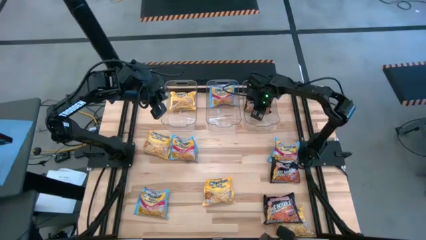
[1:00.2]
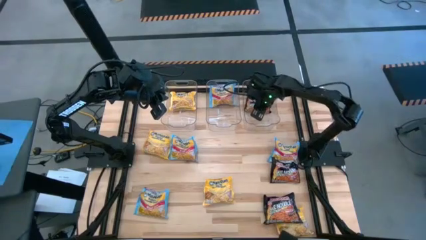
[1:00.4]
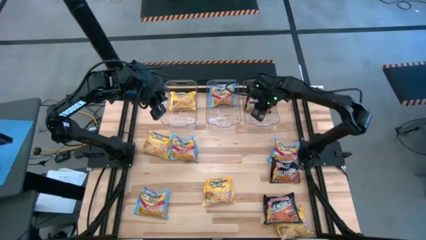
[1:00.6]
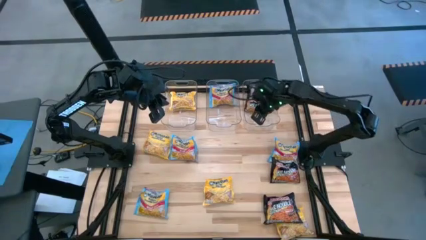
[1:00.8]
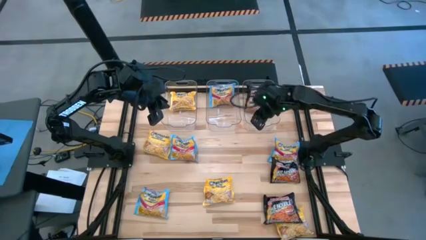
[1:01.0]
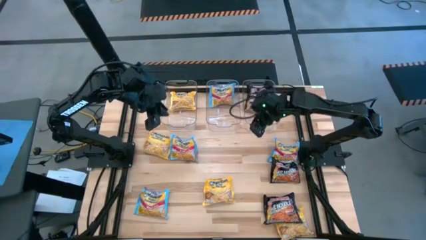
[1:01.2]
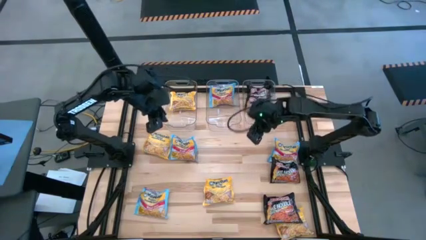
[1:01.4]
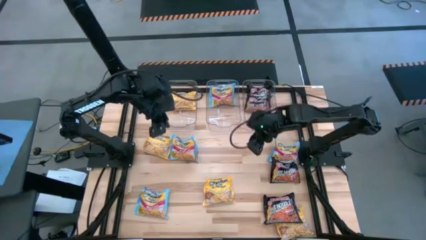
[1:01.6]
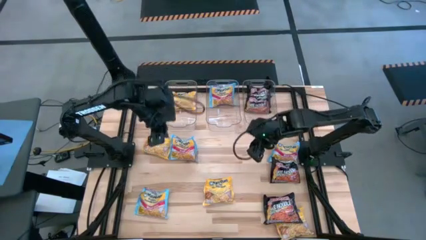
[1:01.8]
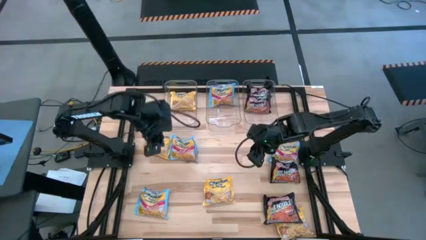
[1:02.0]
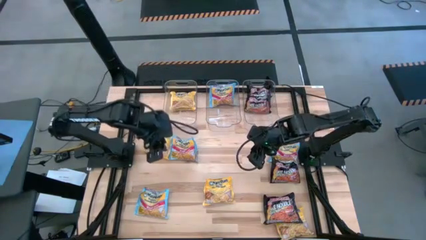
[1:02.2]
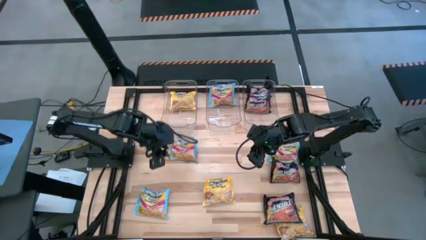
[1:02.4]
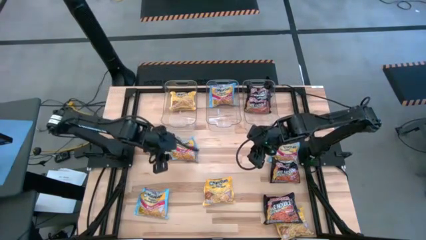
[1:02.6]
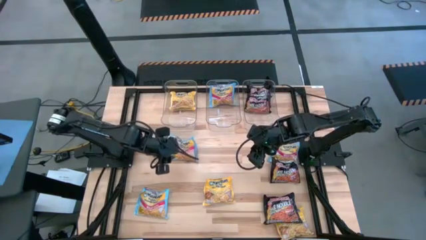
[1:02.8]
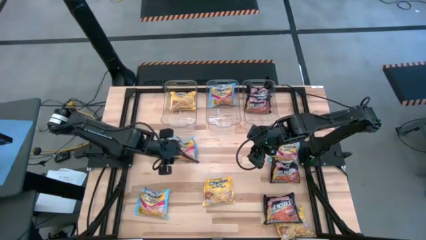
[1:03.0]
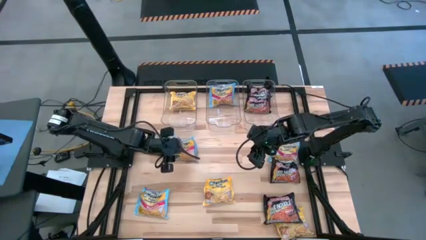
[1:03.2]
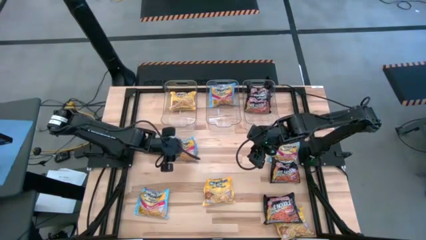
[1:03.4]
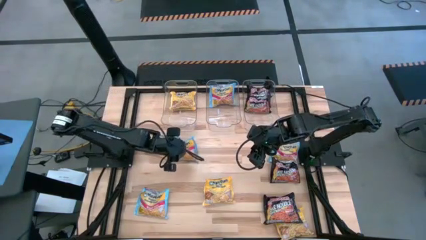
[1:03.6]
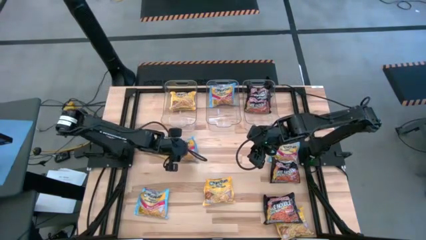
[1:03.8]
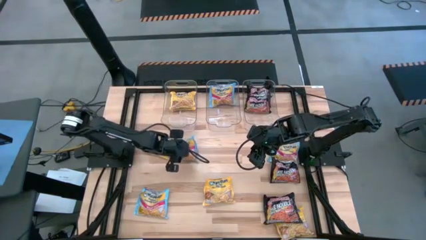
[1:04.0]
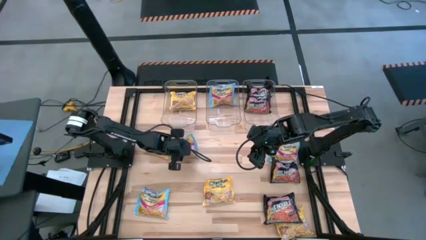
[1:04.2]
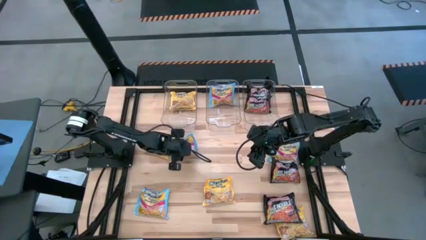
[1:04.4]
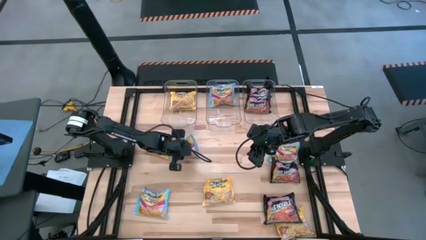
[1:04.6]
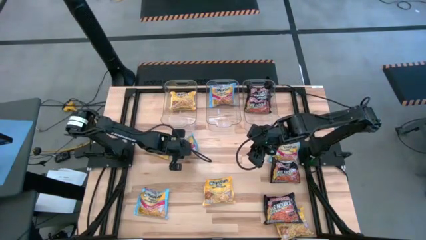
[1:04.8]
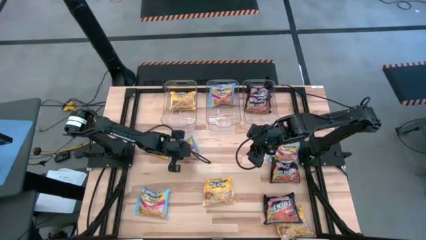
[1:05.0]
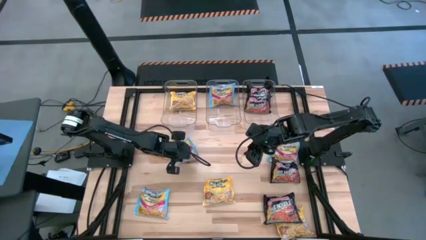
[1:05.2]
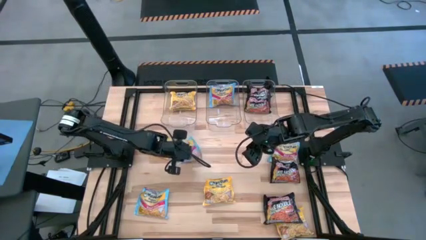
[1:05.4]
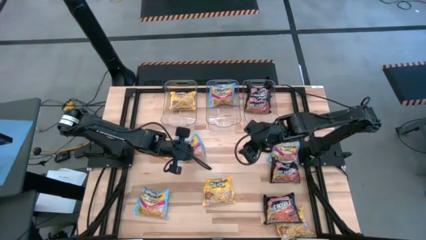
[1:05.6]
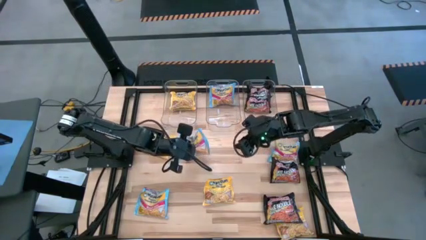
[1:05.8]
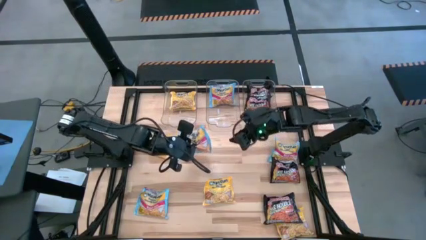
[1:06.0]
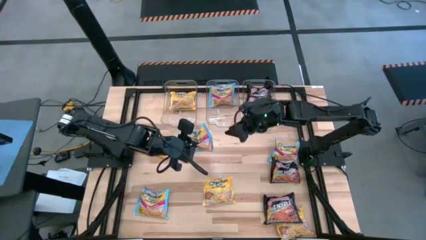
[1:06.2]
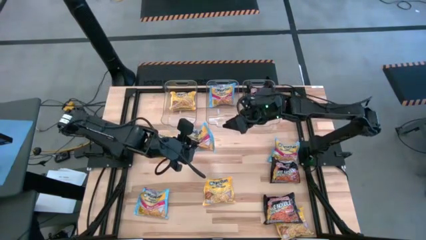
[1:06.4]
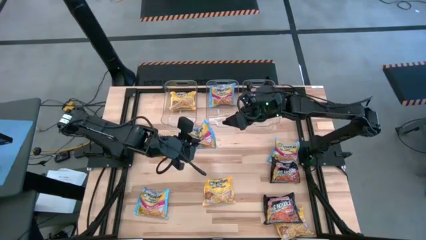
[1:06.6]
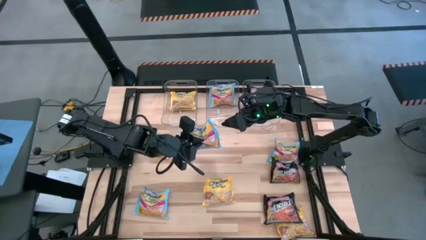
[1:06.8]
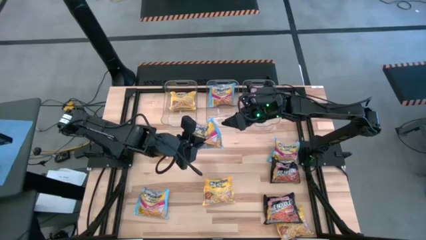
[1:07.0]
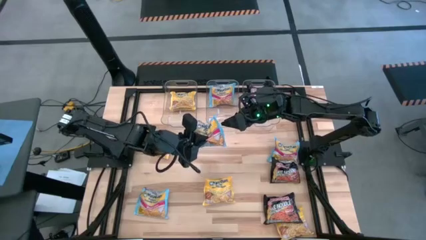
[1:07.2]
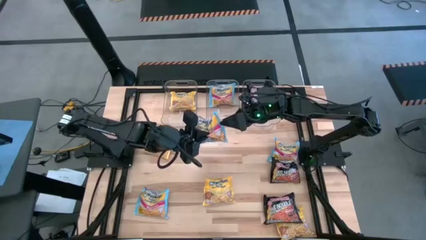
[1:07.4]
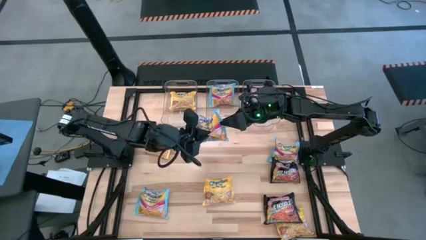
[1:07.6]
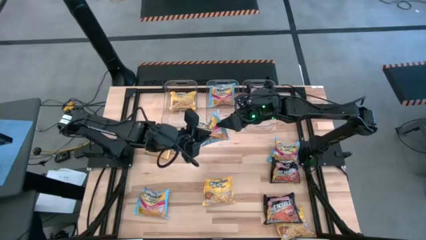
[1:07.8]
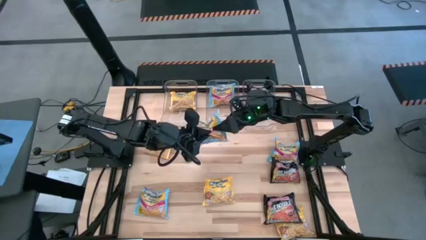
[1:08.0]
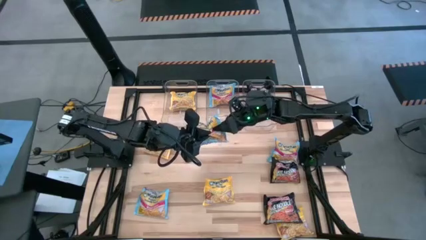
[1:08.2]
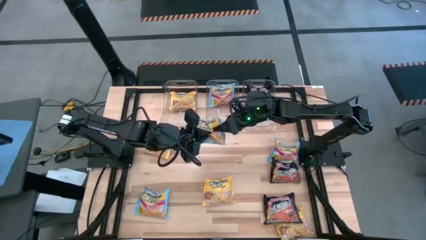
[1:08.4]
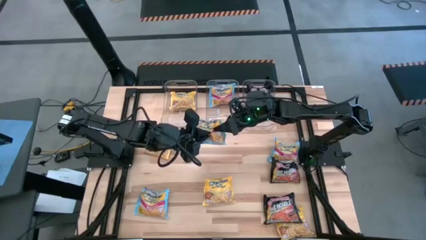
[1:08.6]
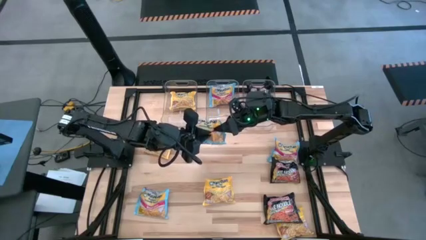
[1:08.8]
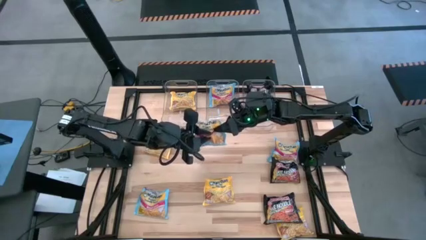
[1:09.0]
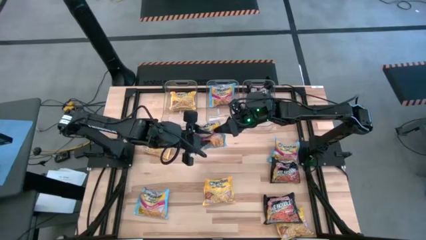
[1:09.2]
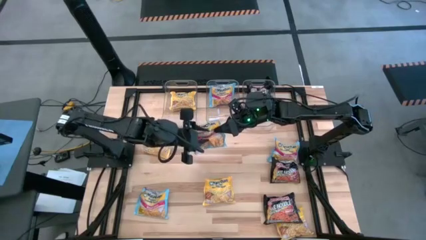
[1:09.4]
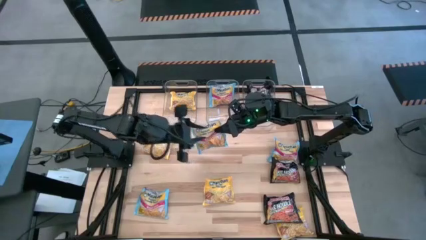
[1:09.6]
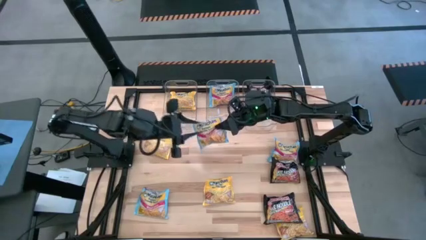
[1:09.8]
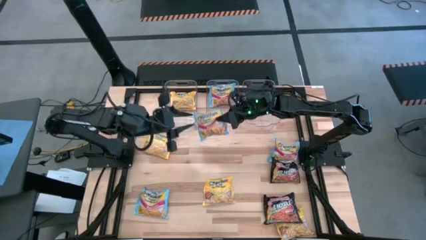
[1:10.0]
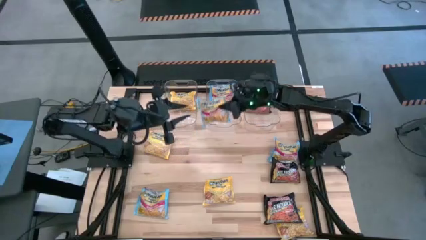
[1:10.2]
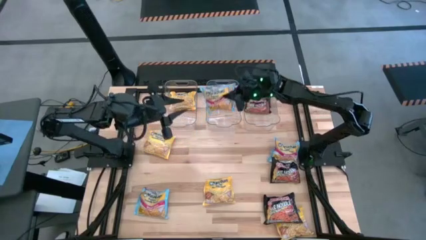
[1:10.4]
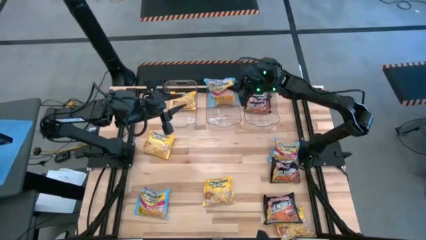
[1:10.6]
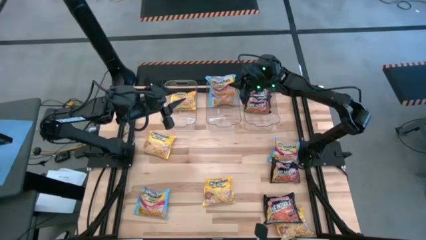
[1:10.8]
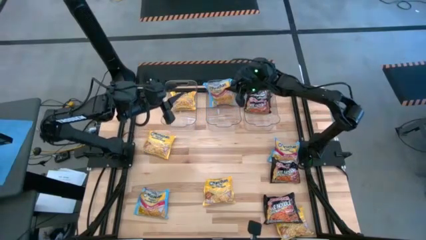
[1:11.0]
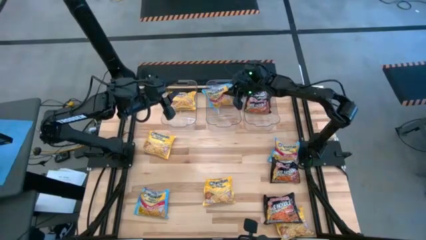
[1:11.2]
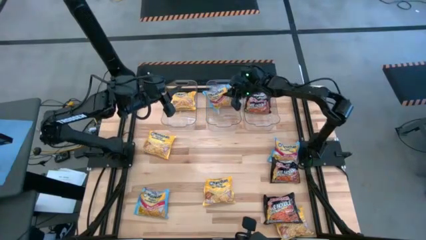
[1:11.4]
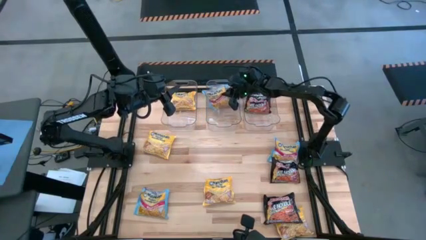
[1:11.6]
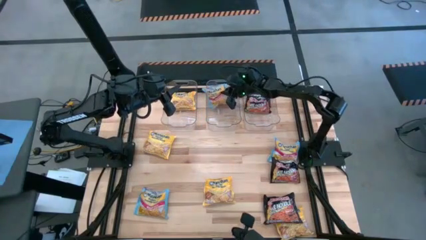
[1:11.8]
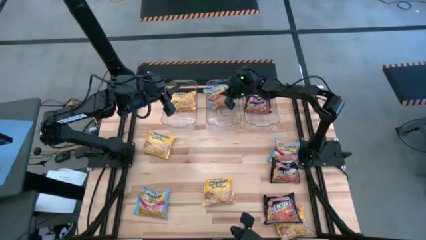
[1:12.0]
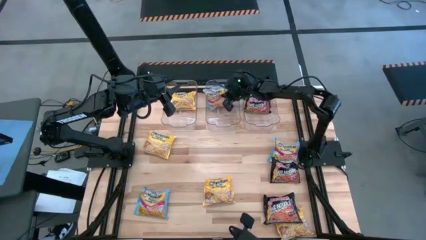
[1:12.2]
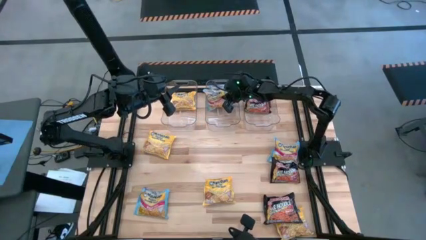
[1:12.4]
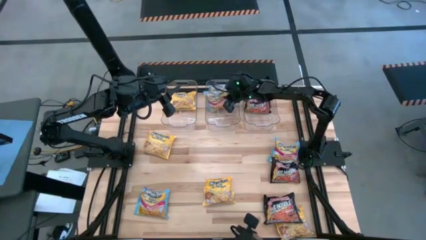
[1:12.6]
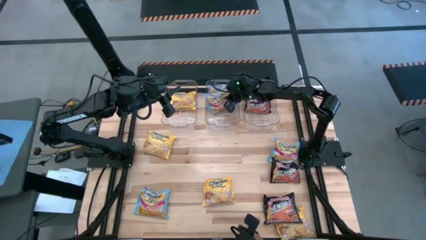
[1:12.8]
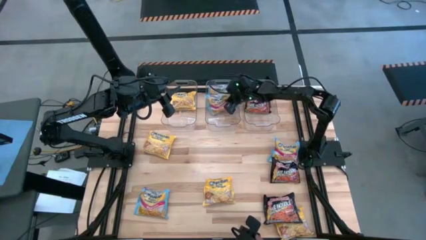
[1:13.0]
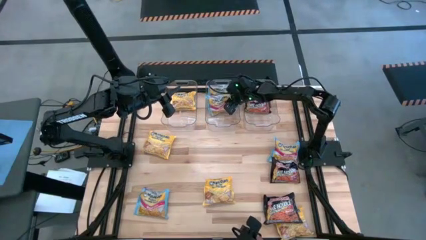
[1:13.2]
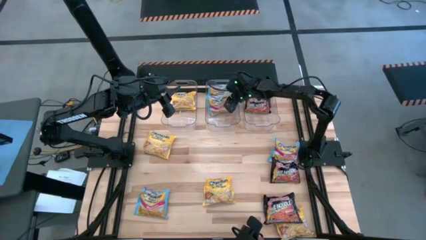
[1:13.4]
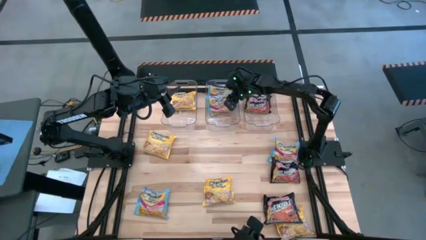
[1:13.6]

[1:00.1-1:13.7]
Task: Sort Maruchan noodles
Put the blue noodle pack into the center transparent bin
